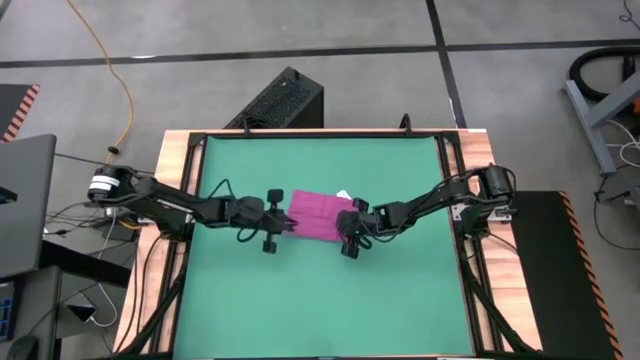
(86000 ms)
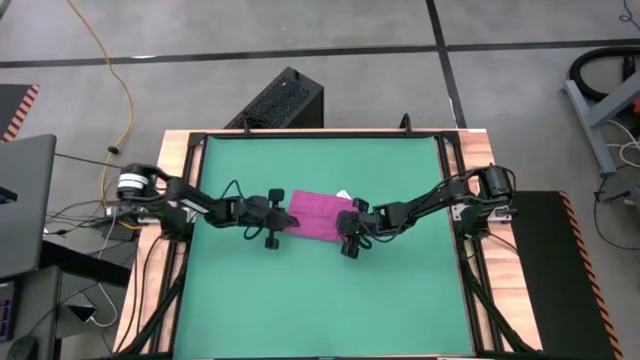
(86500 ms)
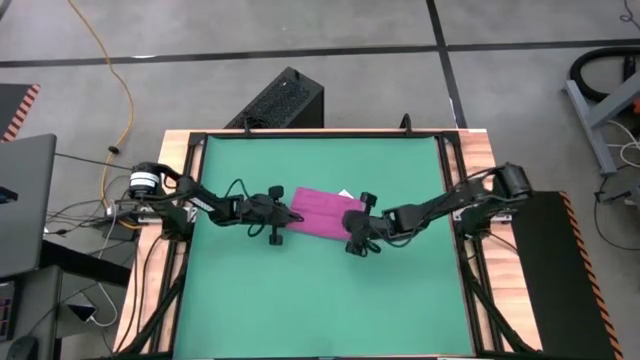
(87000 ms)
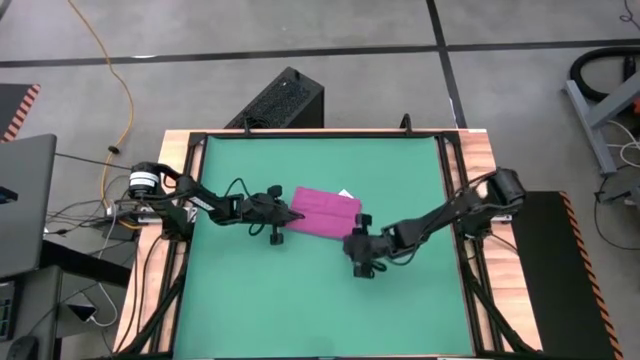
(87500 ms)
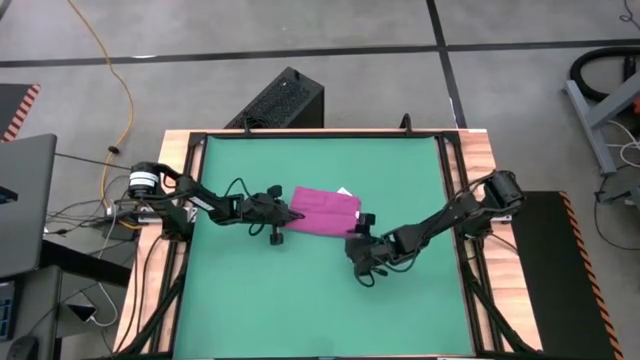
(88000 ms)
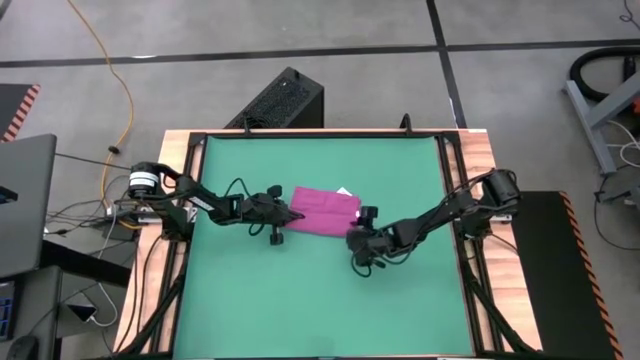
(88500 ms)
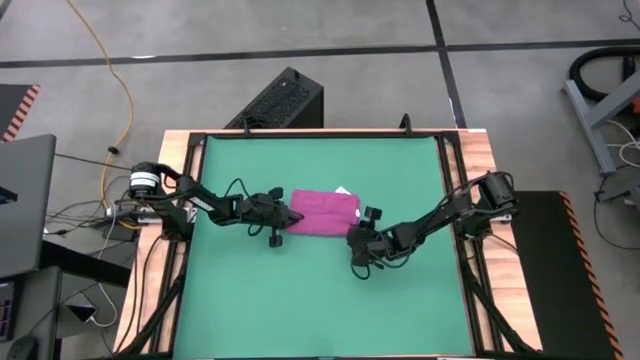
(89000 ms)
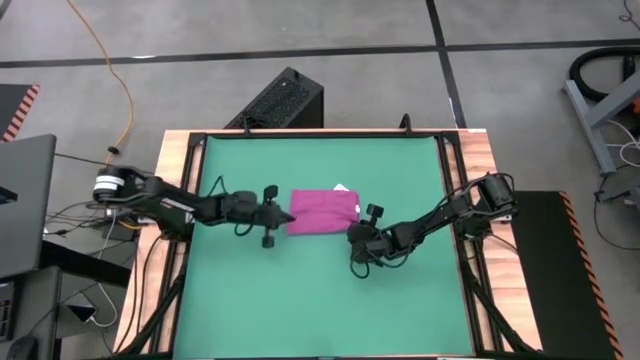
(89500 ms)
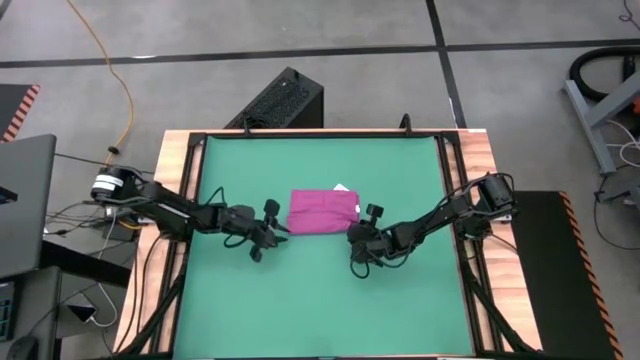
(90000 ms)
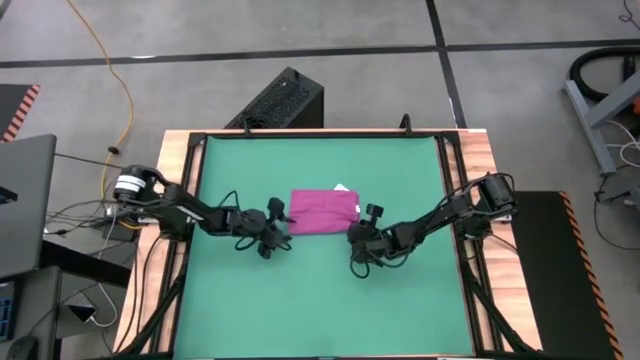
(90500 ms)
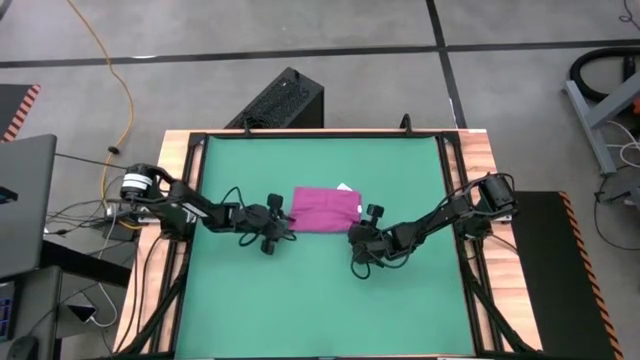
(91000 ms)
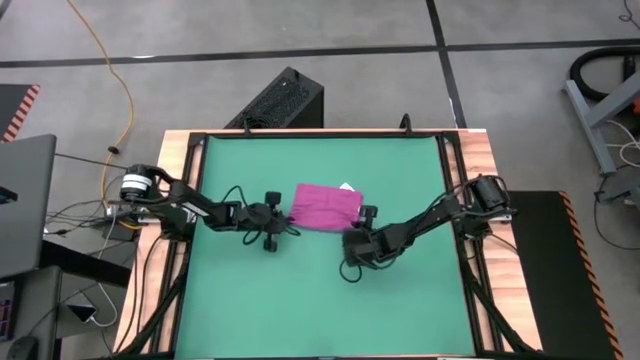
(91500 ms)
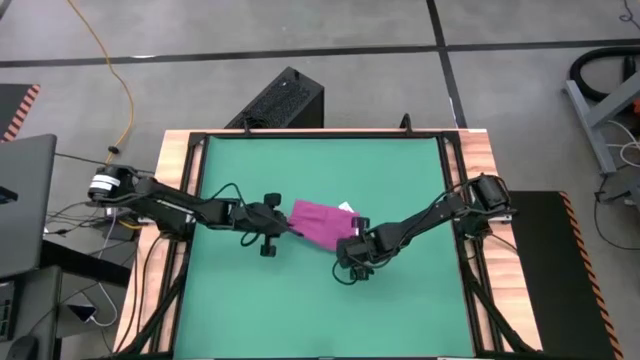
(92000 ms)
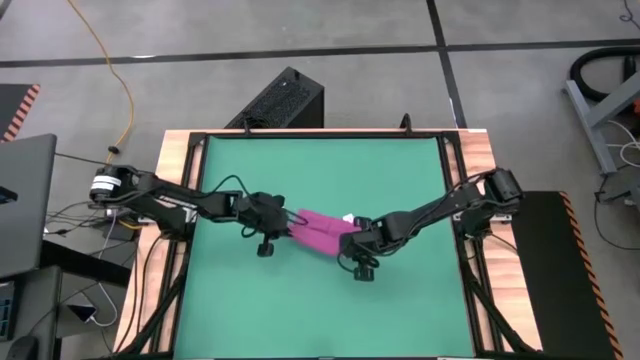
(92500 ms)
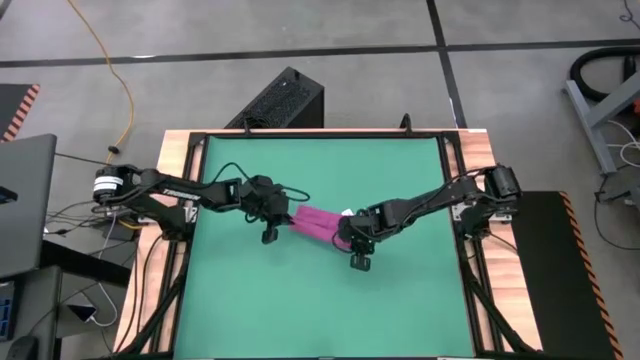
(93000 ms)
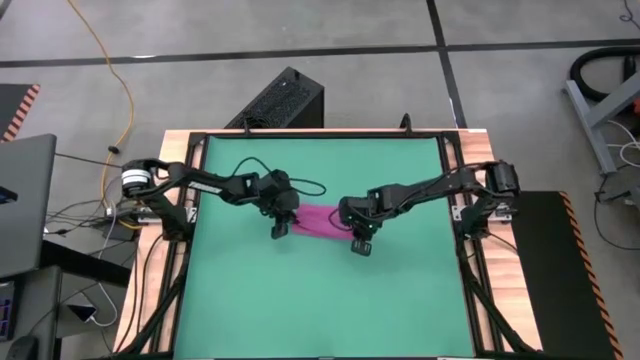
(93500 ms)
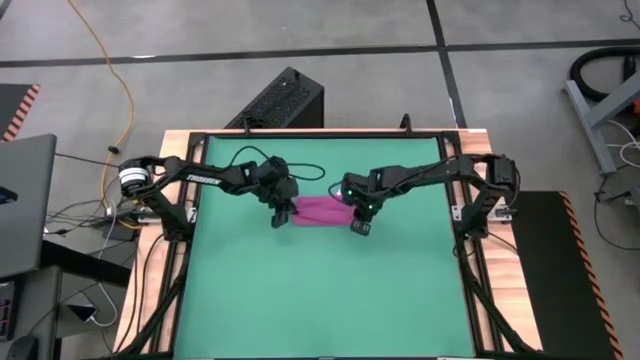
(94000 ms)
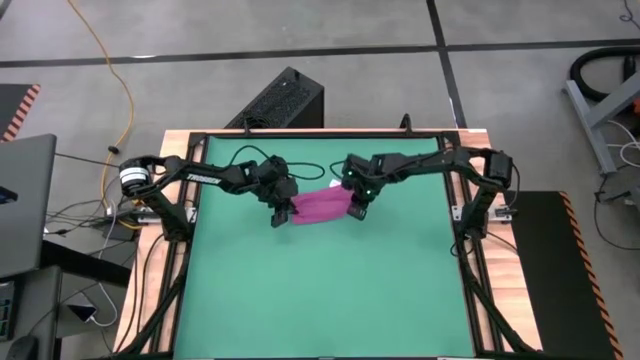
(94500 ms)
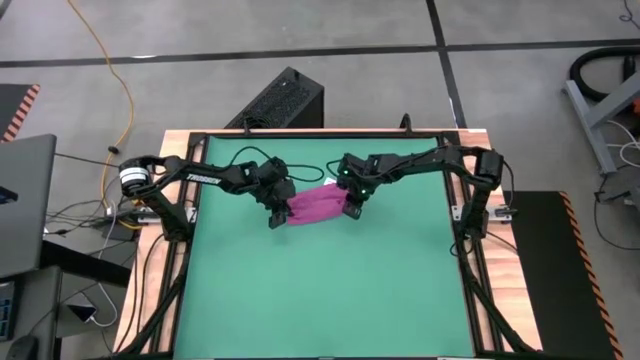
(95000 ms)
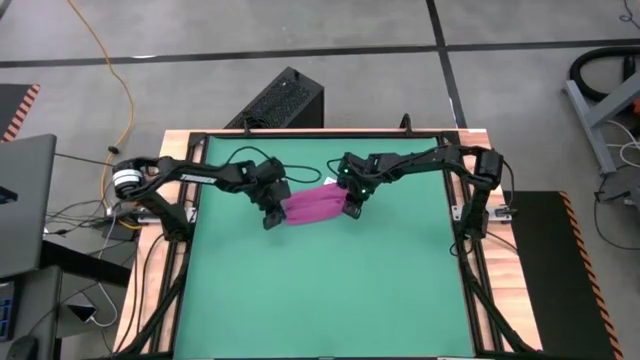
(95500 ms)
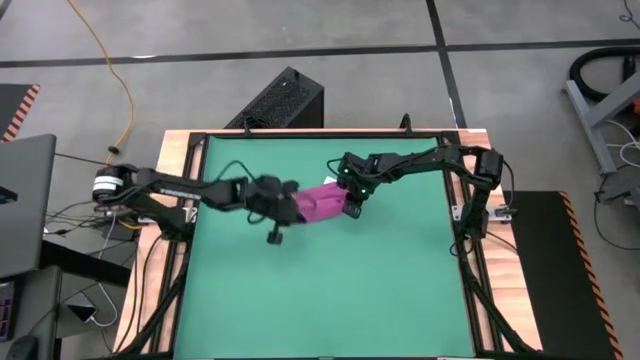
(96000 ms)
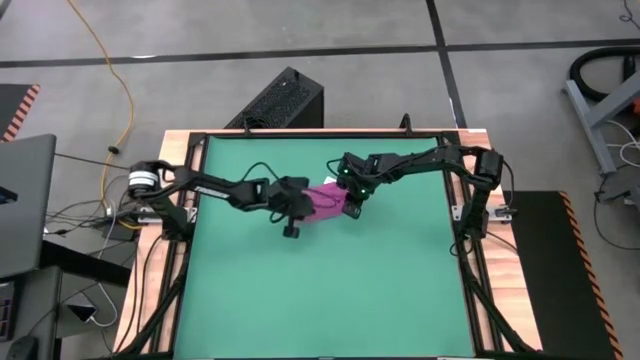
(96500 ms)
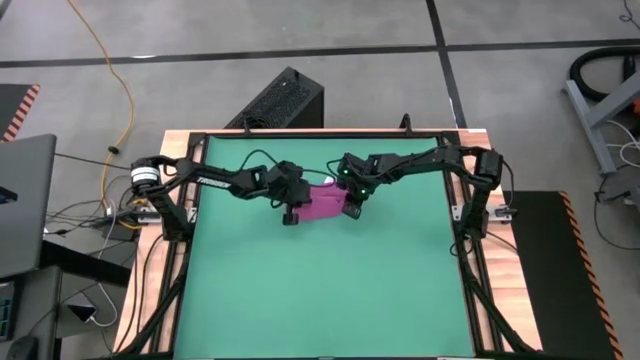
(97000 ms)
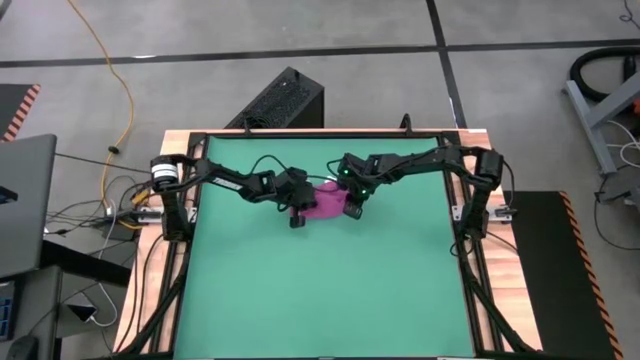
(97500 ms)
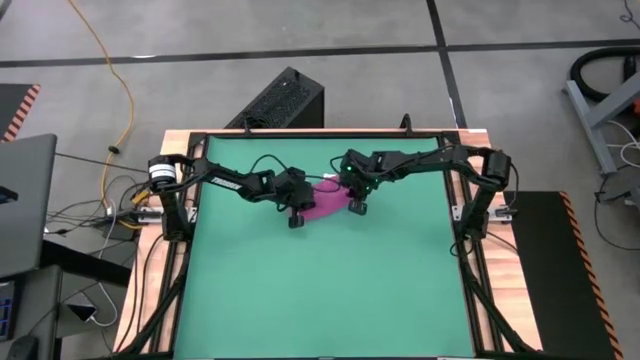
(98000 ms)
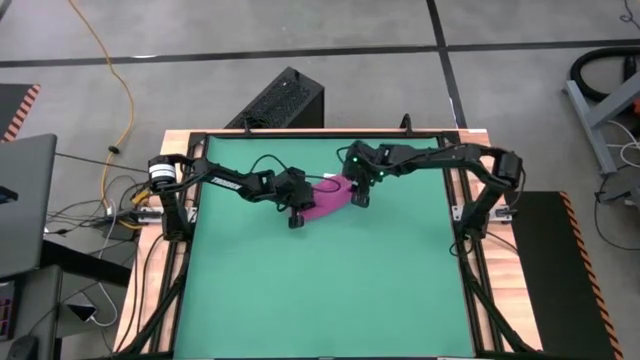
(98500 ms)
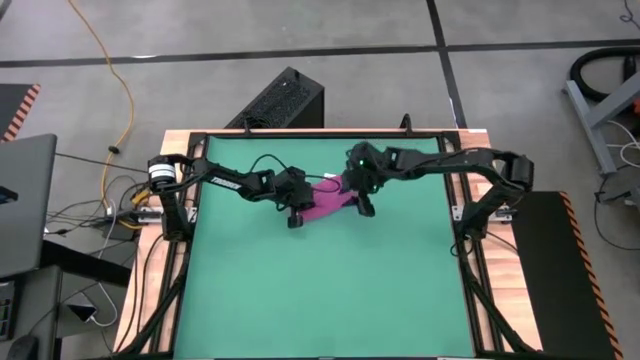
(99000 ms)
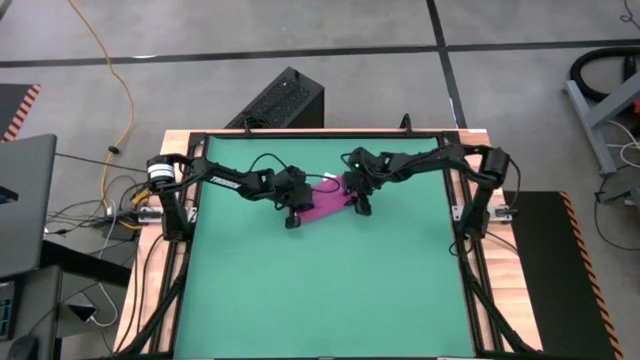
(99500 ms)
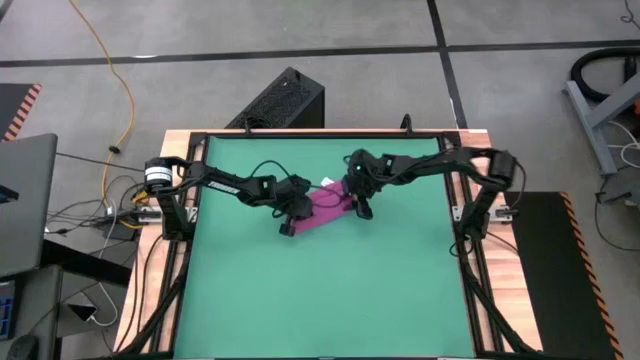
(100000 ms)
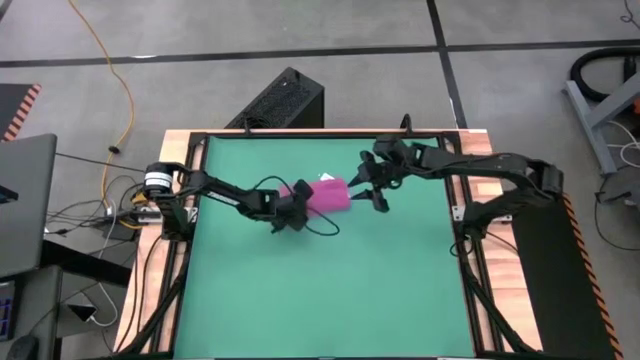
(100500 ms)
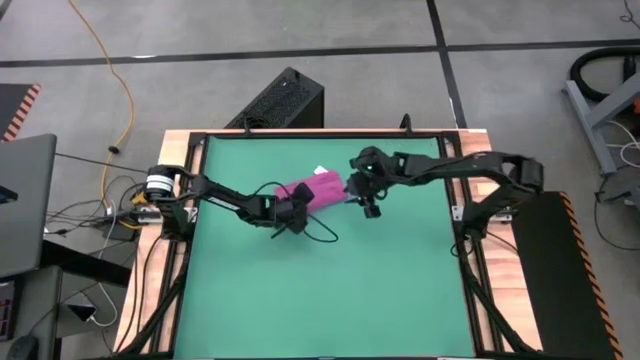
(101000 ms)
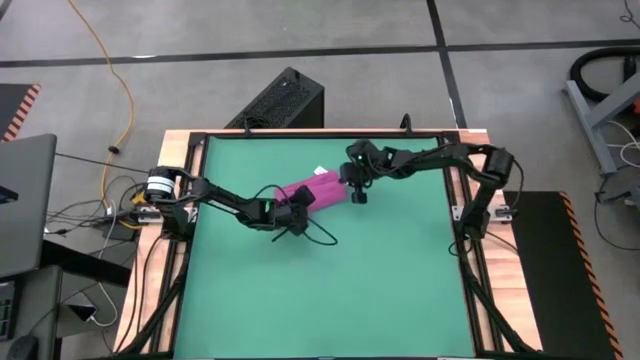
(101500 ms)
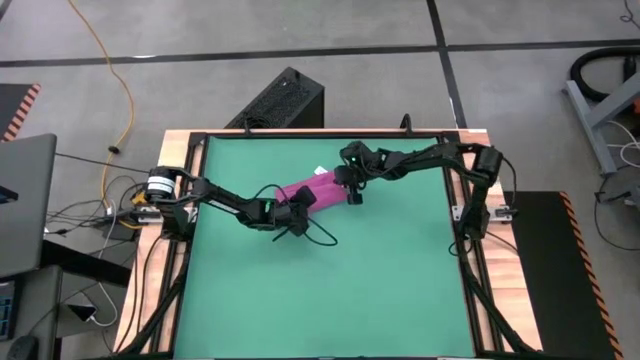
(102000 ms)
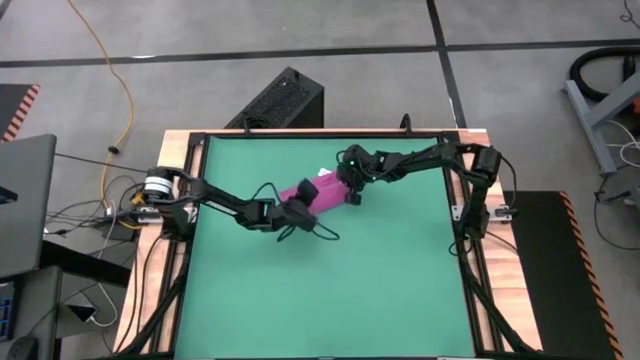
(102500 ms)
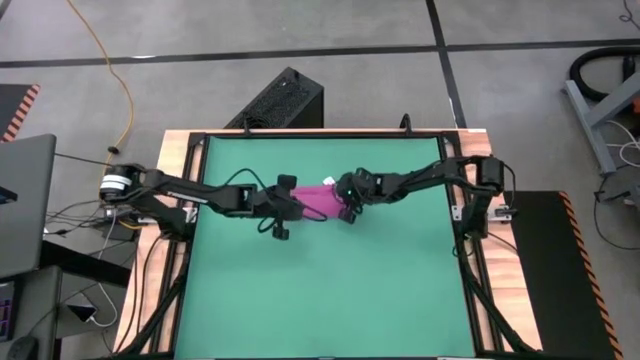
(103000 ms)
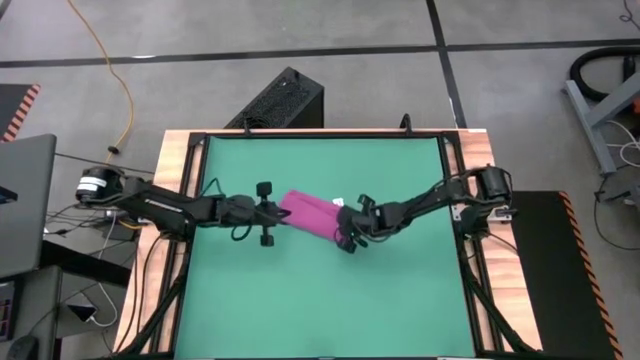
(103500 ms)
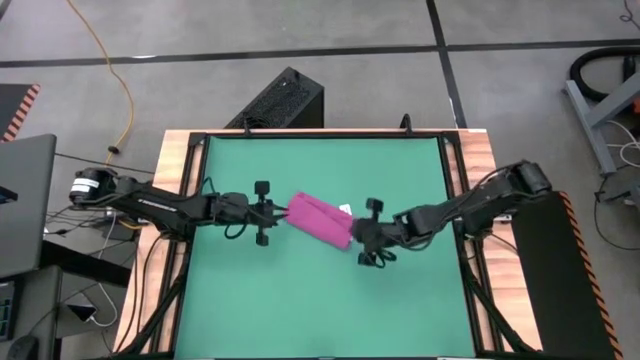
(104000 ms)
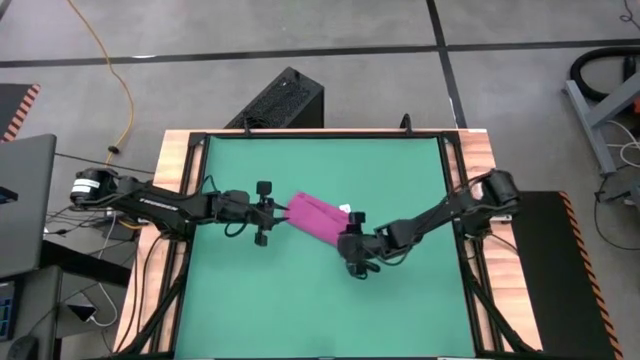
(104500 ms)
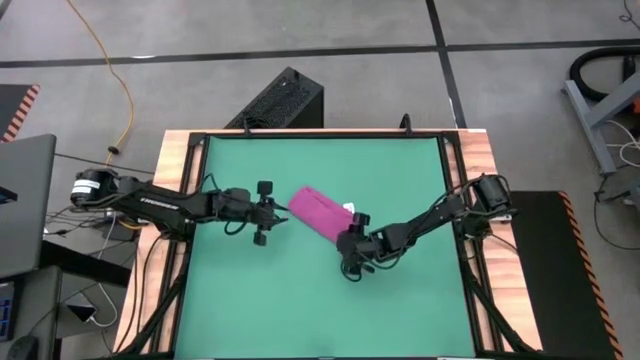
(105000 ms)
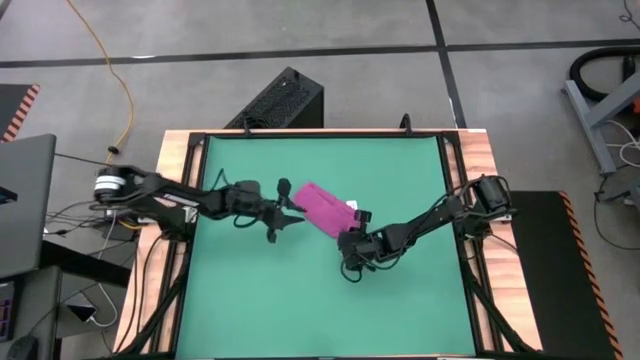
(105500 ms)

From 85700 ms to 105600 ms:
Task: Roll towel into tight, uniform cylinder
Roll the pink towel
